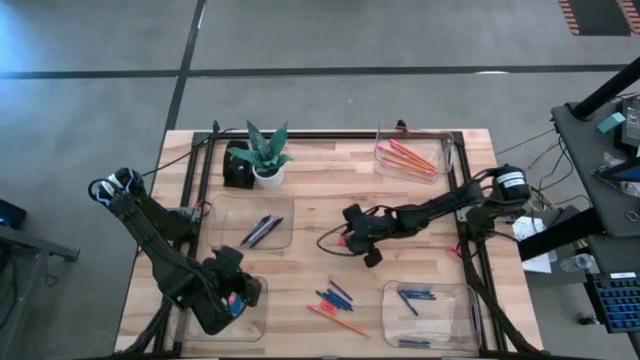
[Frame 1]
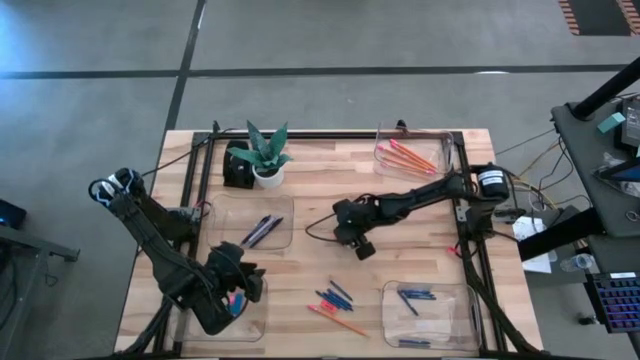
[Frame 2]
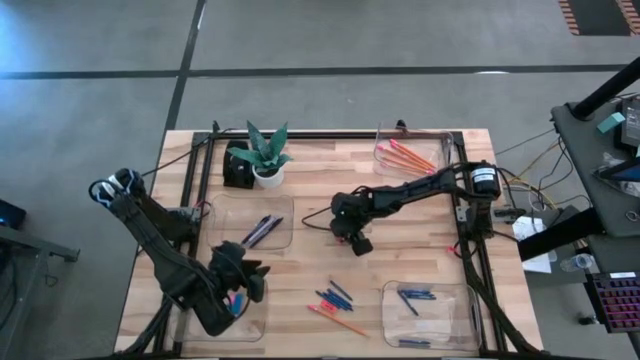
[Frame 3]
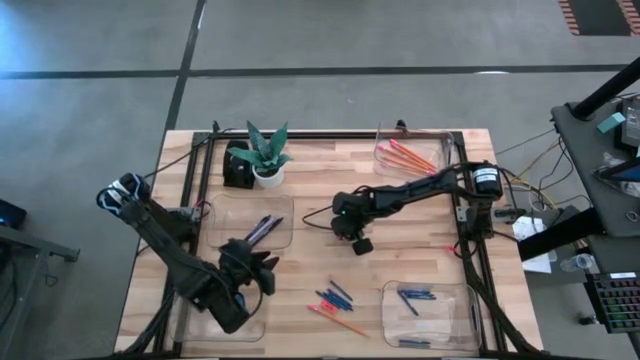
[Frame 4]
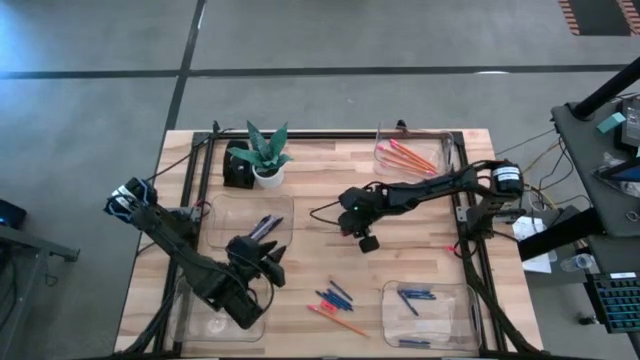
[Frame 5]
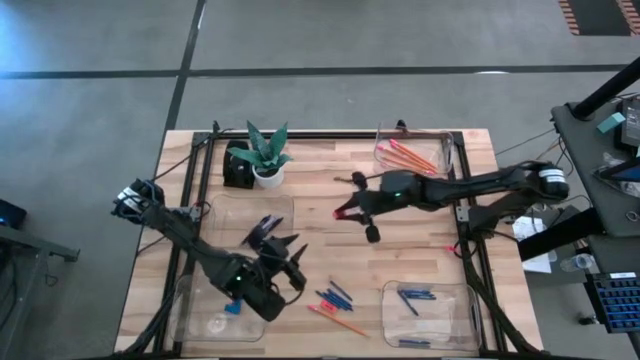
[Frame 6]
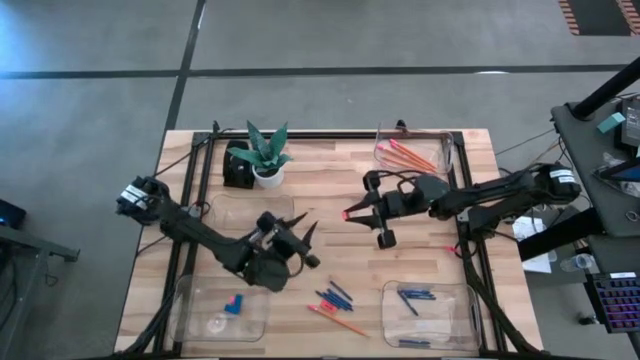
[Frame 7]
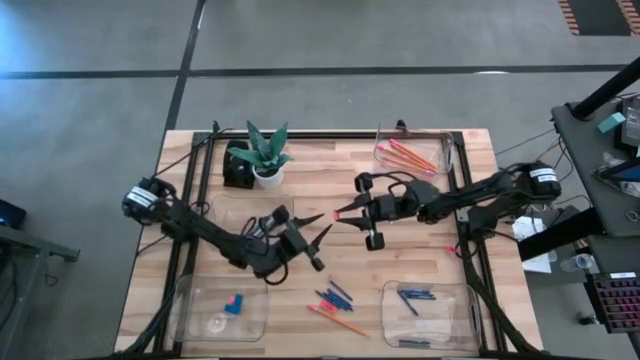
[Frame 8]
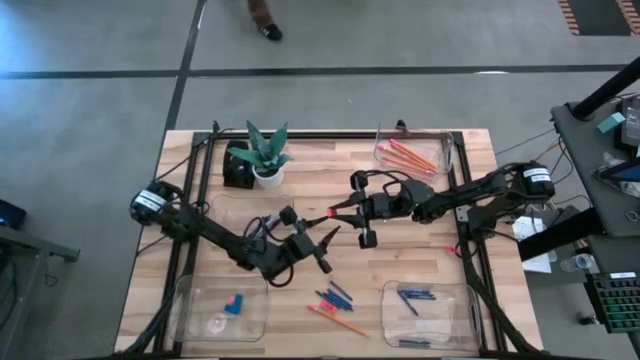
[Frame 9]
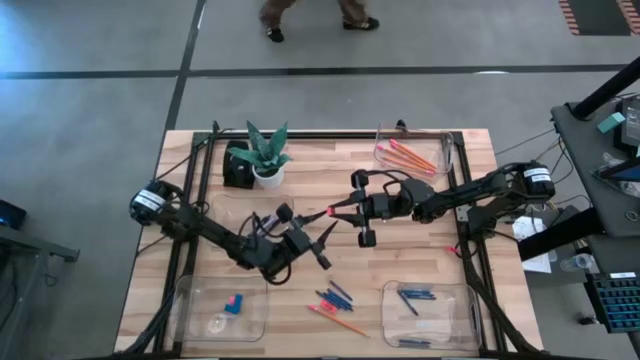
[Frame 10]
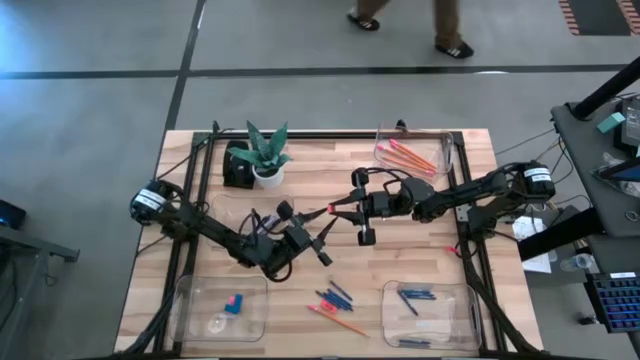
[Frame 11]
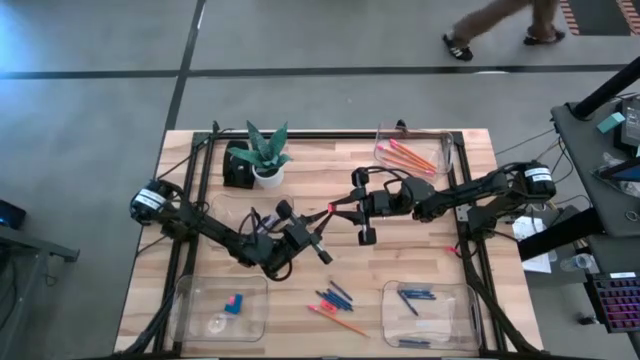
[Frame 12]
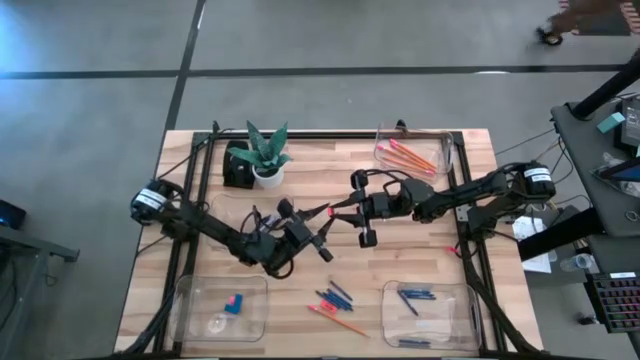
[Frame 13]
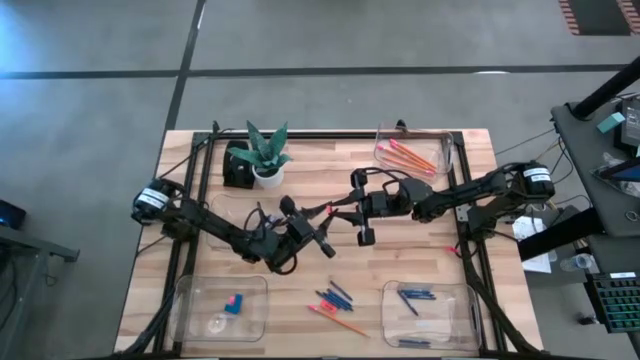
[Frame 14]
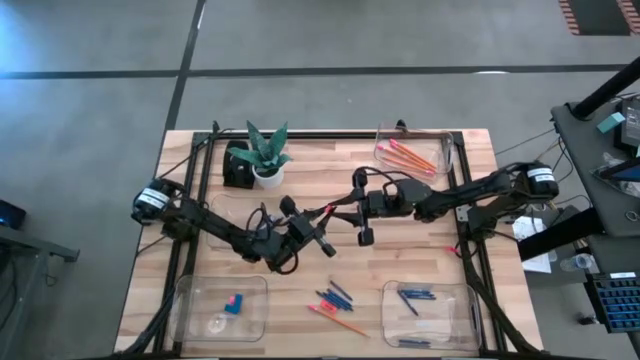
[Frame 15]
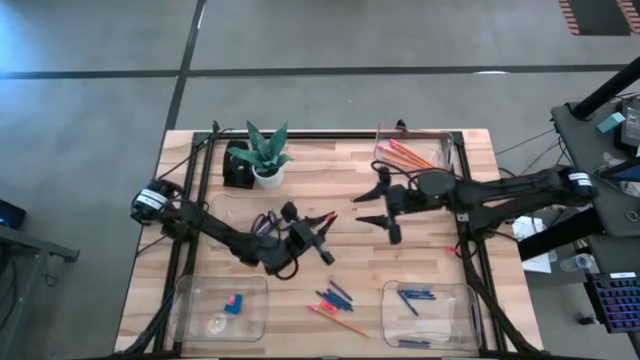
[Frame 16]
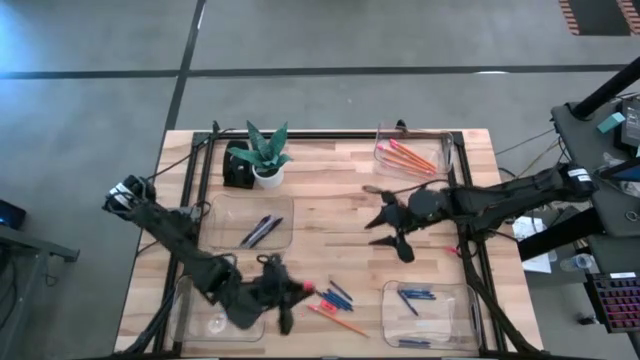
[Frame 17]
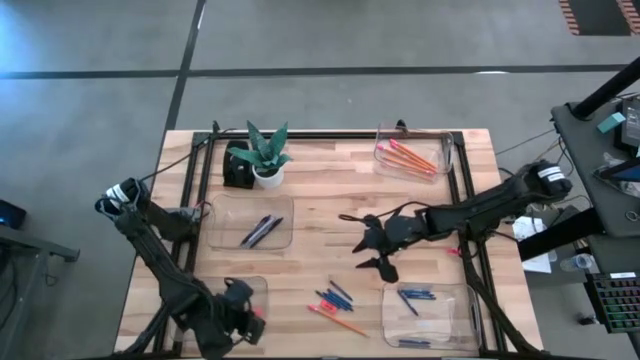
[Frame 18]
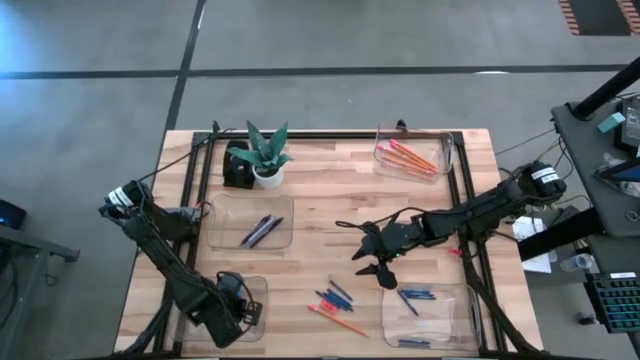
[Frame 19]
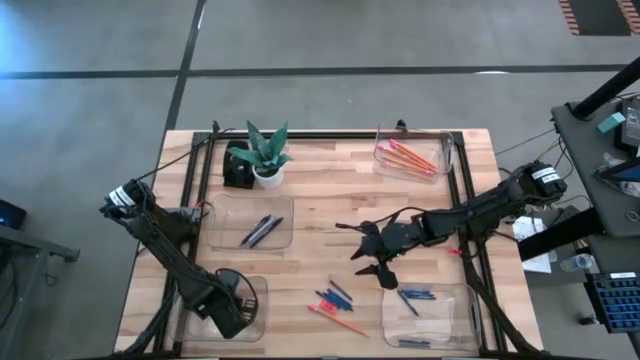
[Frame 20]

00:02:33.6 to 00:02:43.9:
Task: Sort crayons/erasers/pens/pencils in bins
Put the orange eraser into the bottom left transparent bin

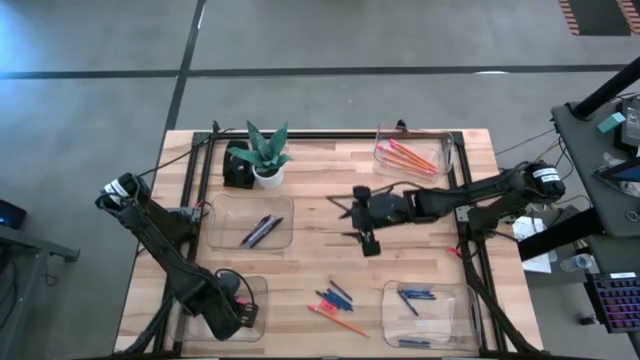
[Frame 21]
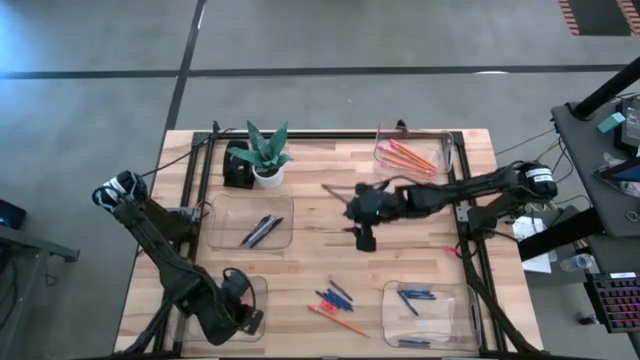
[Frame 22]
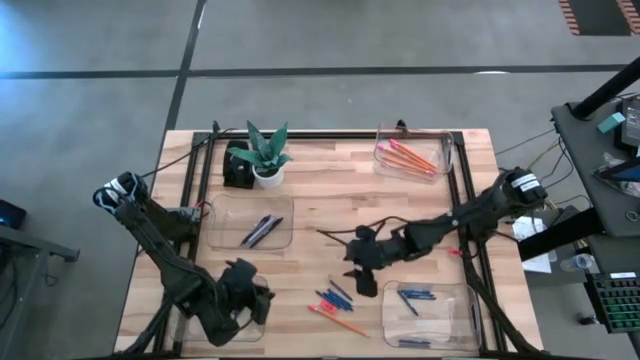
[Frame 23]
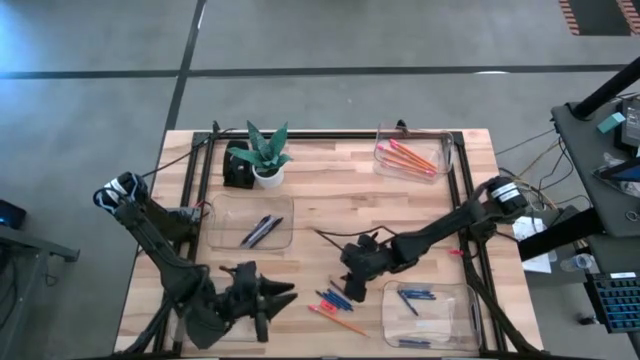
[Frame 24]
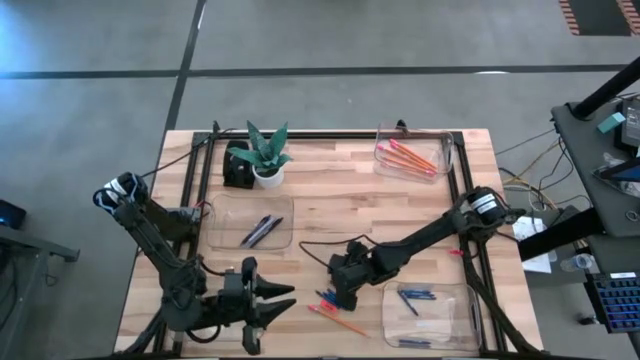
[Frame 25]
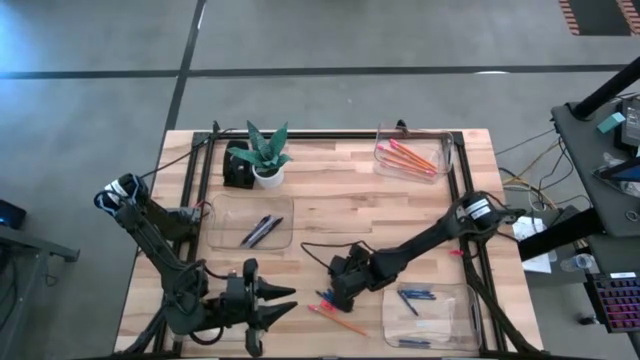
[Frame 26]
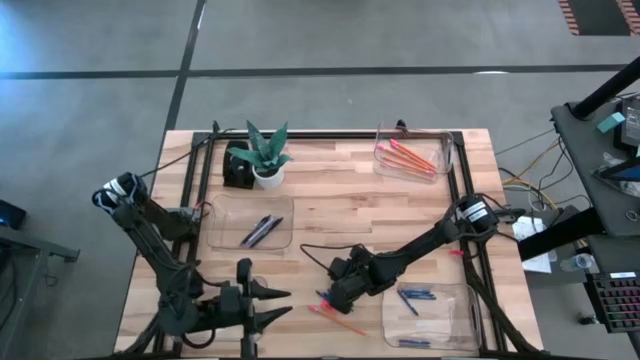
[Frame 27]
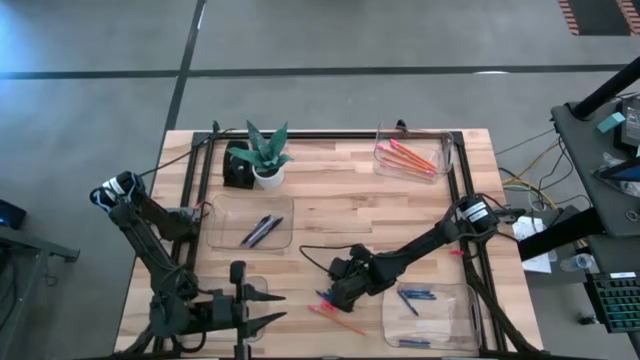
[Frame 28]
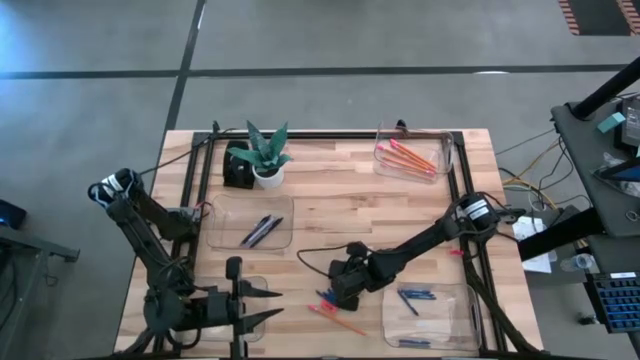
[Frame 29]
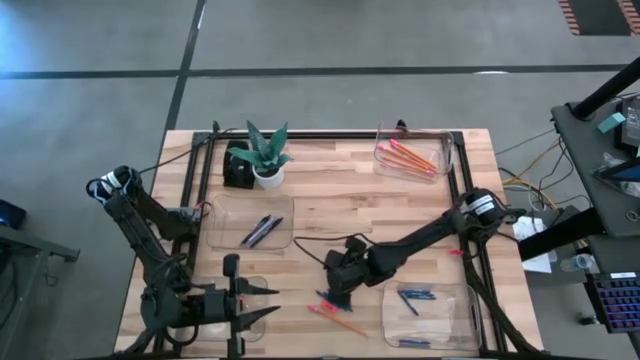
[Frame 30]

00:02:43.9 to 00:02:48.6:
Put the blue crayon into the bottom right transparent bin

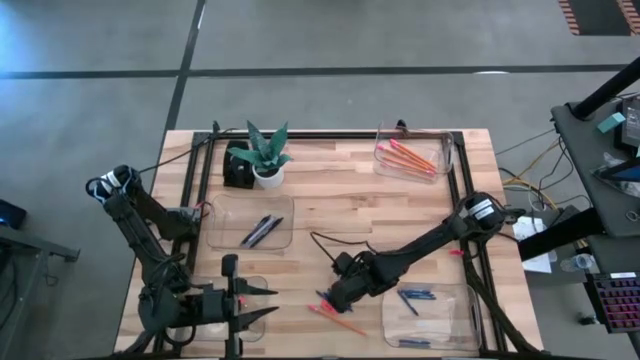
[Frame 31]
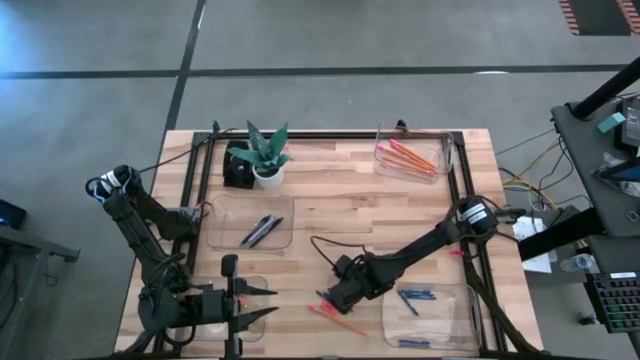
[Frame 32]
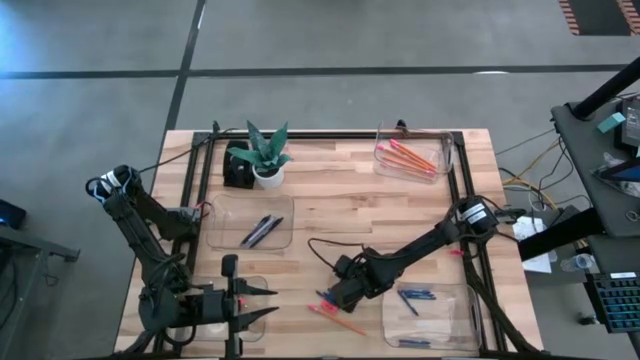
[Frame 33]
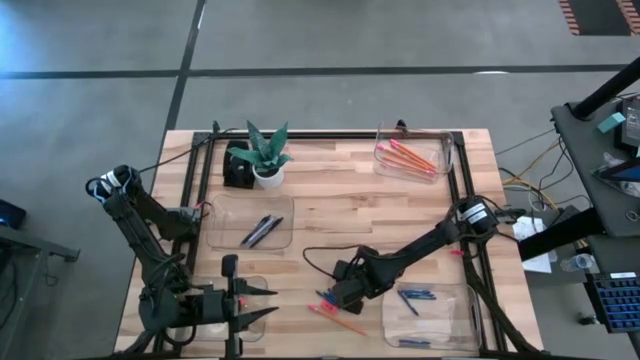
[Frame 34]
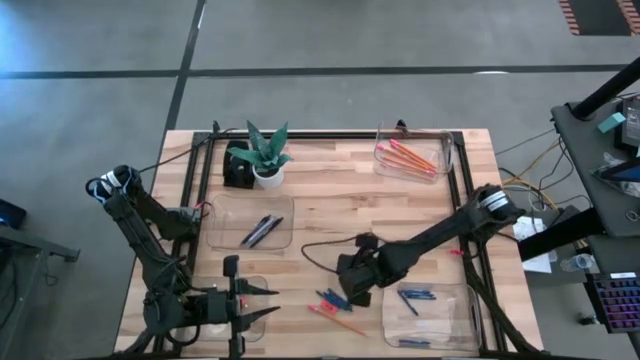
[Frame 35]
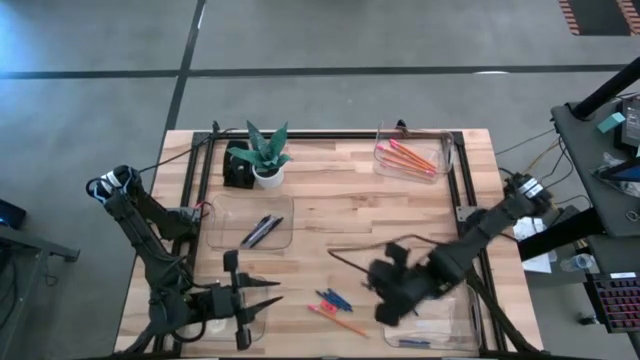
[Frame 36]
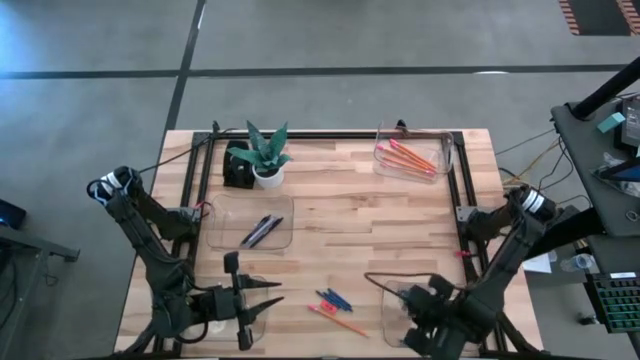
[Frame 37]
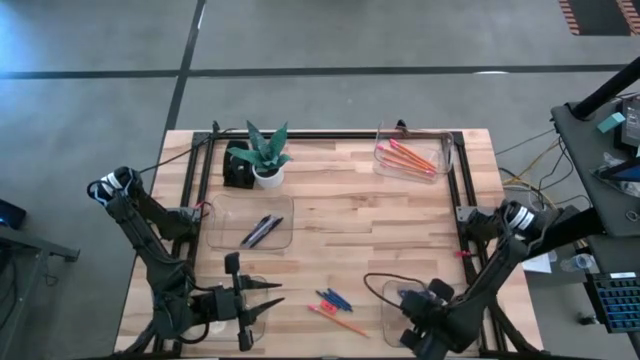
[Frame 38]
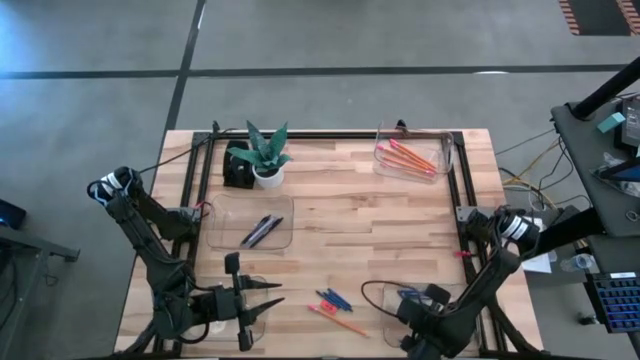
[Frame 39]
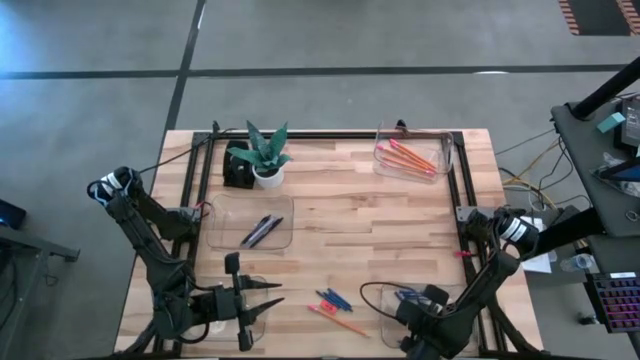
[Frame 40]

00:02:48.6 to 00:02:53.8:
Put the blue crayon into the bottom right transparent bin
